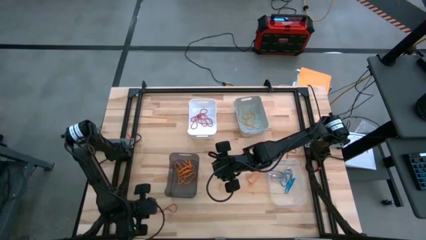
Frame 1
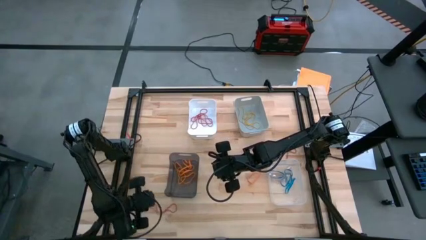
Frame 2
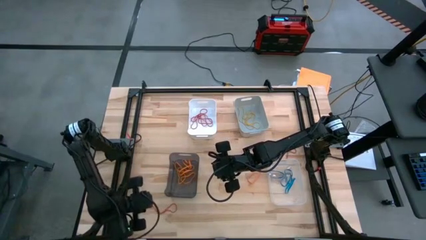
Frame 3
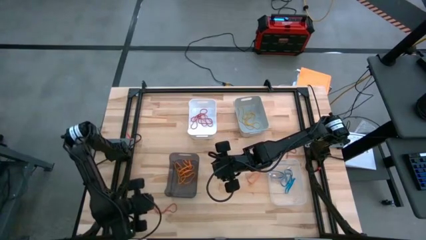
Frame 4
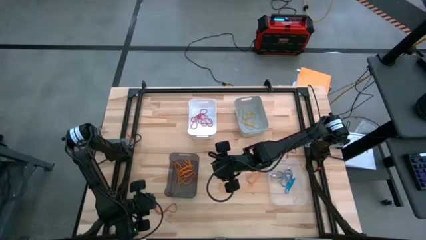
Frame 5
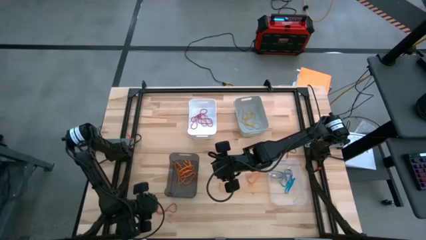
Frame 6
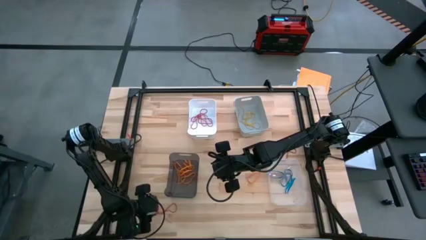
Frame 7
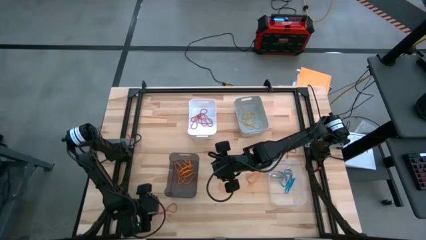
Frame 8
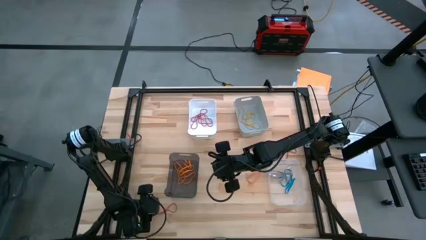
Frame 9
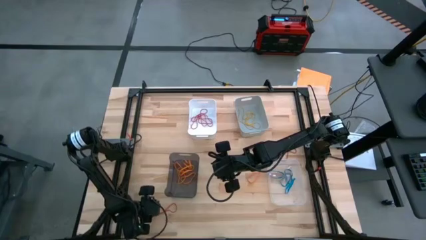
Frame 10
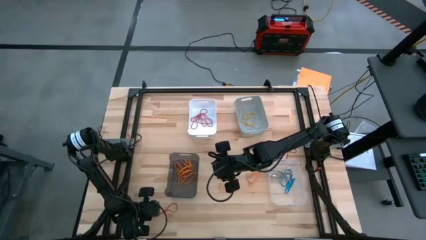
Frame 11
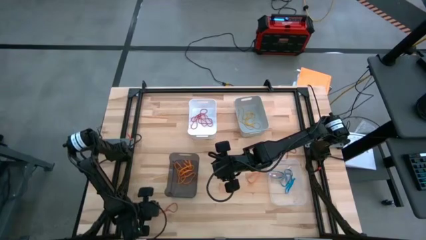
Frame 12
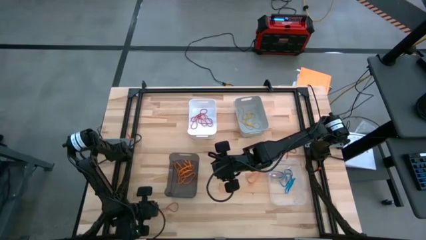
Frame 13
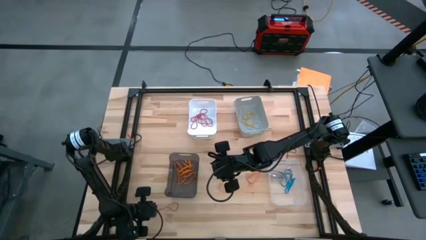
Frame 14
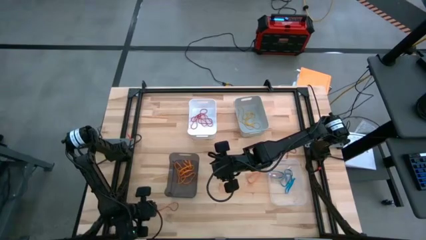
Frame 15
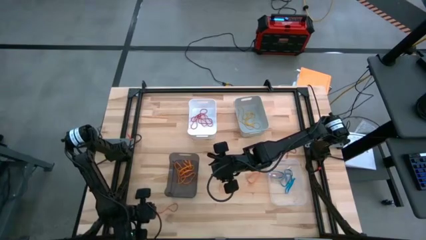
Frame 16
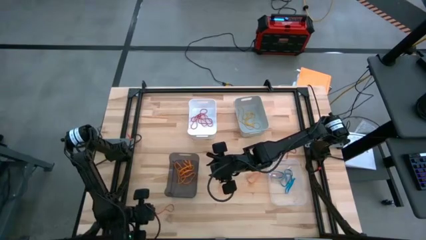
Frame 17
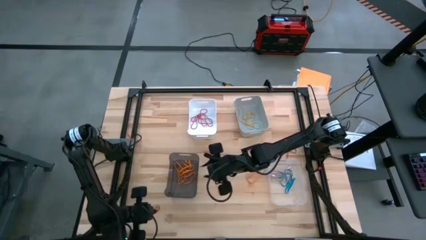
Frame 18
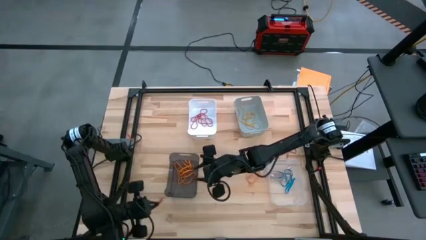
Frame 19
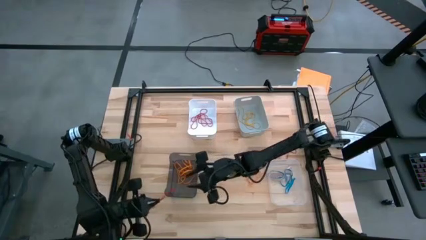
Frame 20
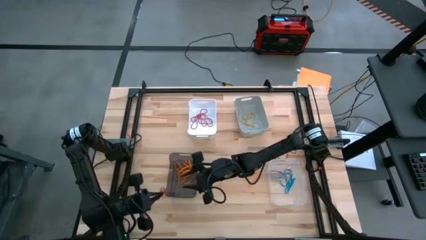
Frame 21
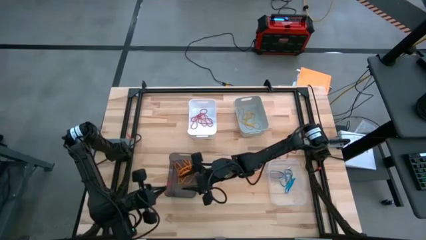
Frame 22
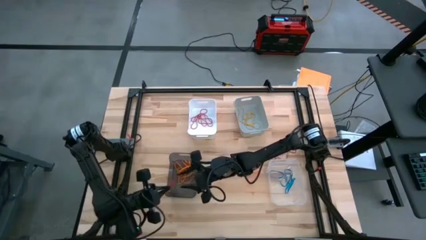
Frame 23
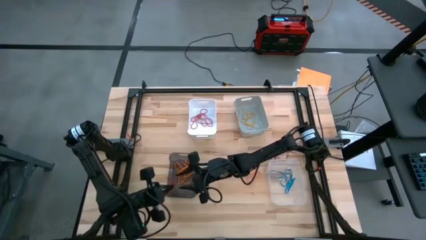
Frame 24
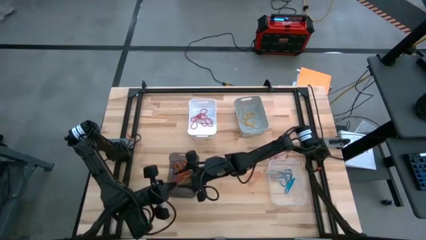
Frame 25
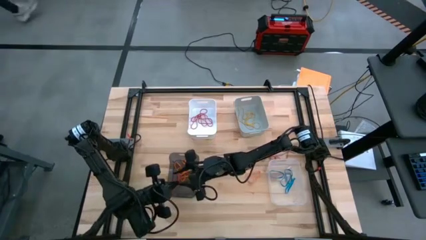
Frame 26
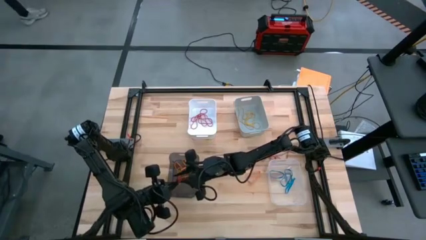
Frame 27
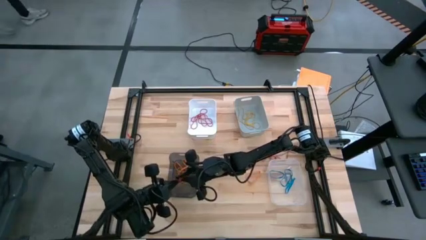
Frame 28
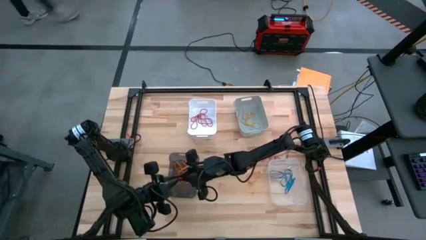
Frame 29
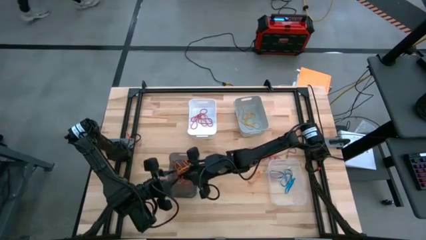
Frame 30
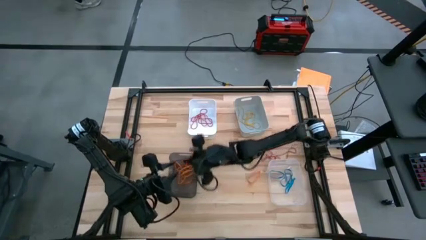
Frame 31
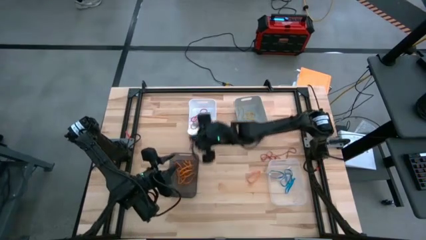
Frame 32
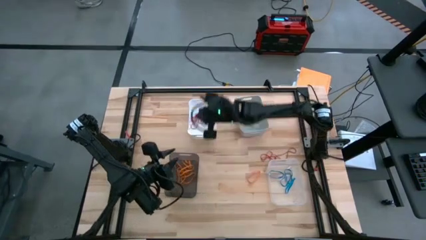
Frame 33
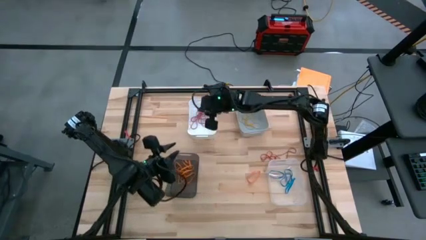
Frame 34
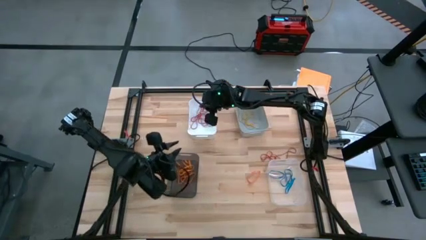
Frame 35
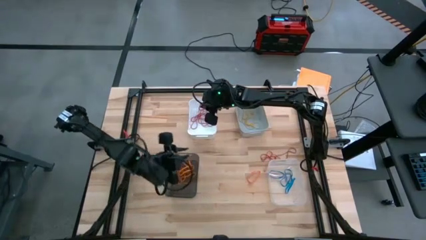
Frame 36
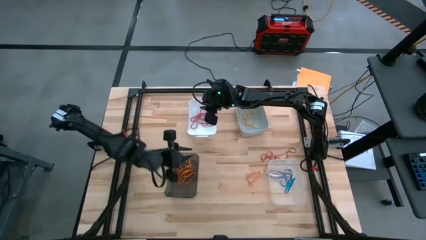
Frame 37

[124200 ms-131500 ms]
Task: Sort rubber bands into baskets
Put the red rubber band into the white bin

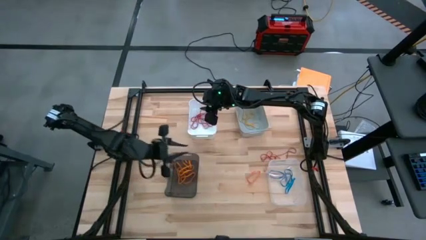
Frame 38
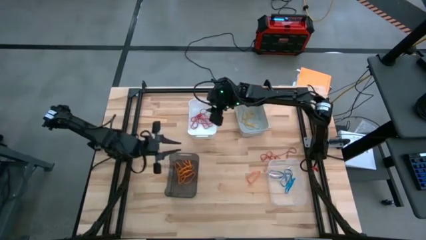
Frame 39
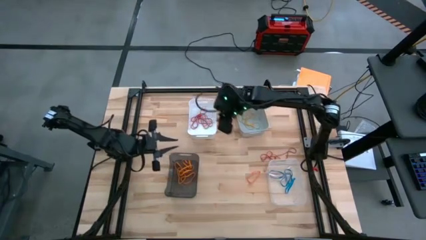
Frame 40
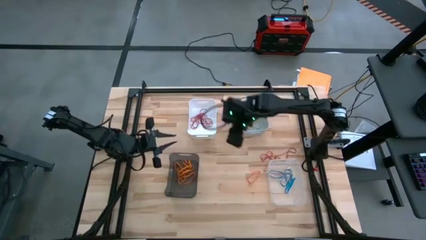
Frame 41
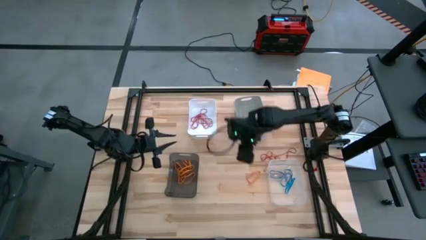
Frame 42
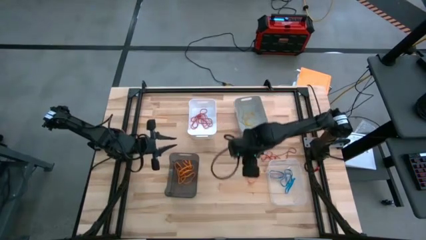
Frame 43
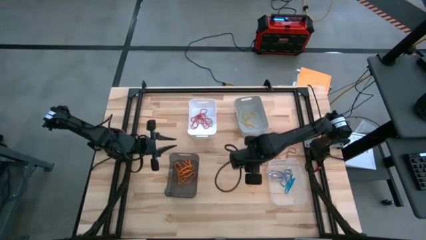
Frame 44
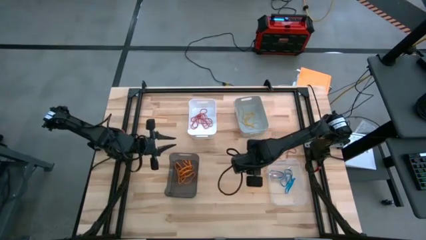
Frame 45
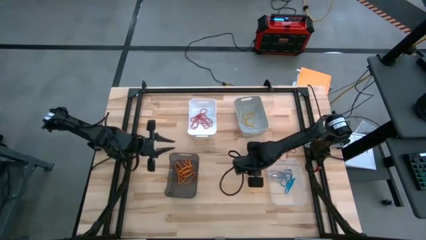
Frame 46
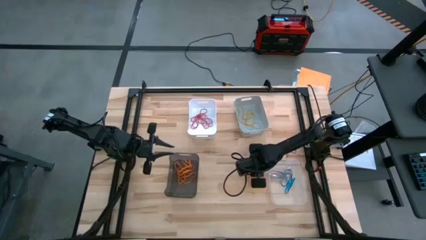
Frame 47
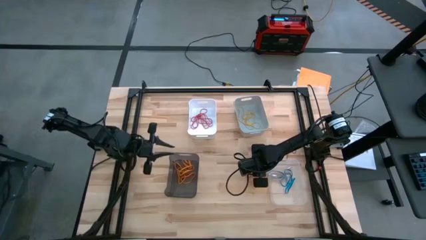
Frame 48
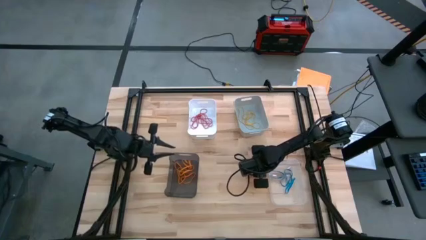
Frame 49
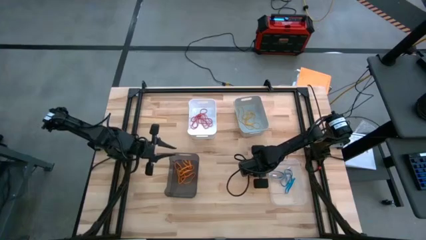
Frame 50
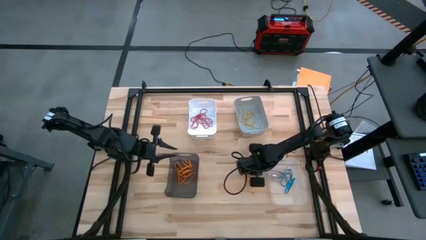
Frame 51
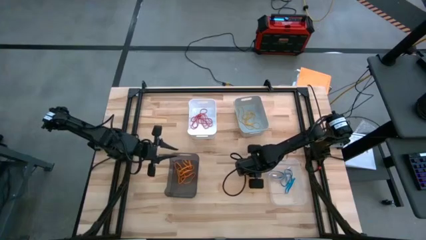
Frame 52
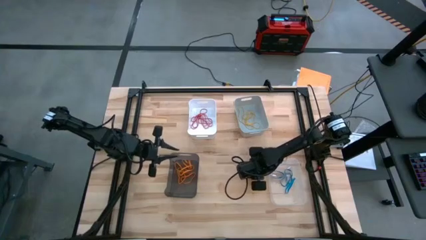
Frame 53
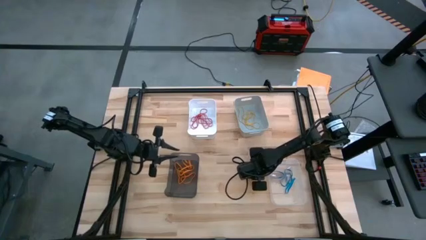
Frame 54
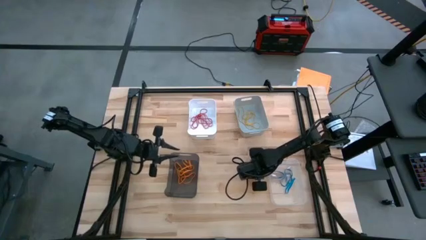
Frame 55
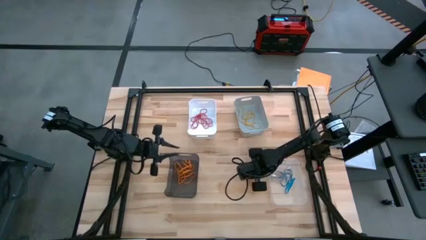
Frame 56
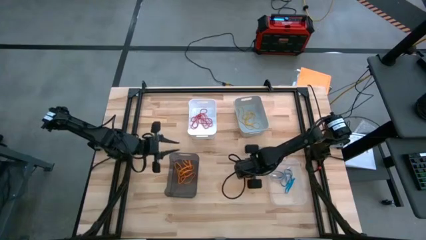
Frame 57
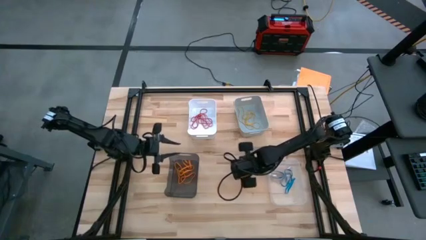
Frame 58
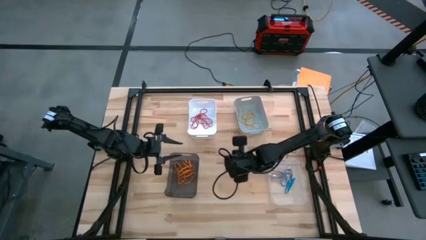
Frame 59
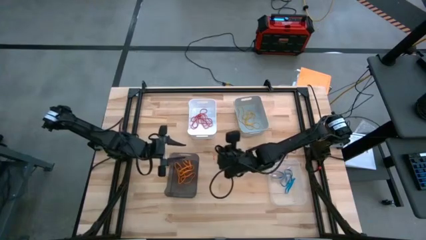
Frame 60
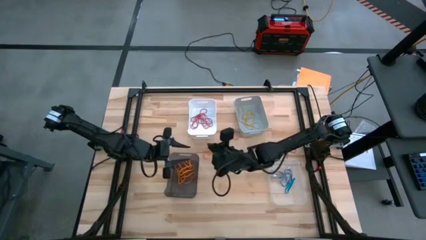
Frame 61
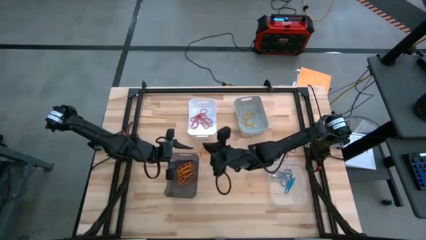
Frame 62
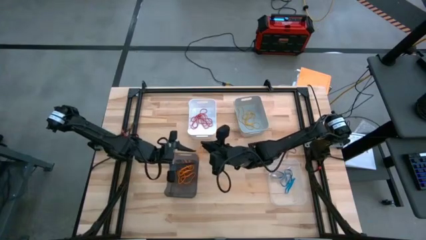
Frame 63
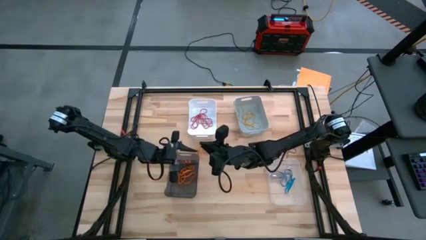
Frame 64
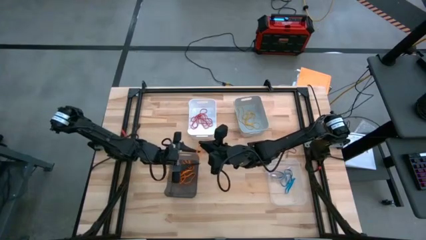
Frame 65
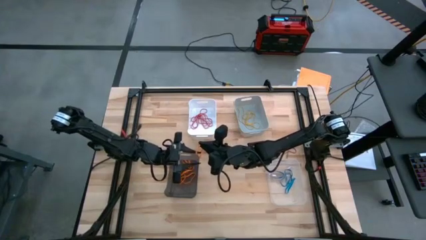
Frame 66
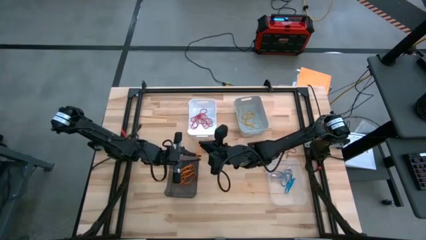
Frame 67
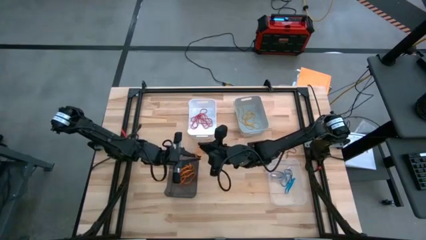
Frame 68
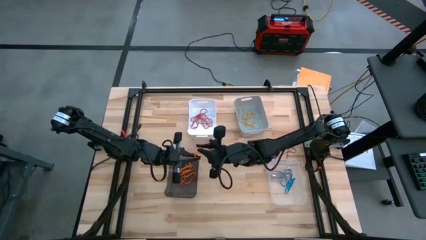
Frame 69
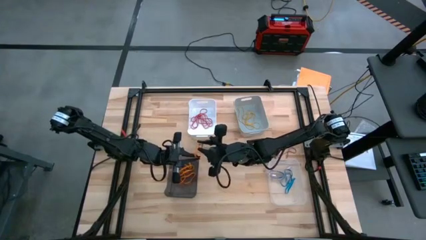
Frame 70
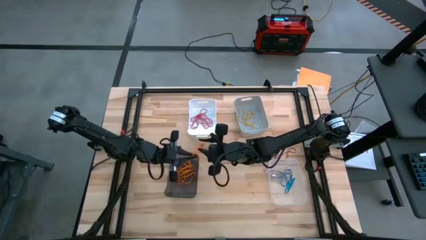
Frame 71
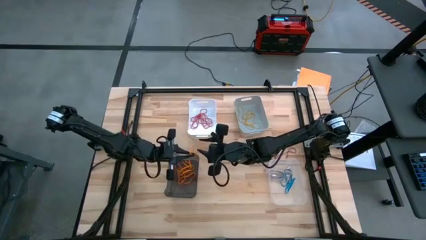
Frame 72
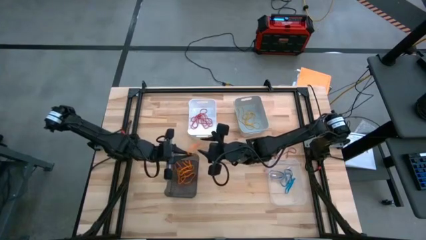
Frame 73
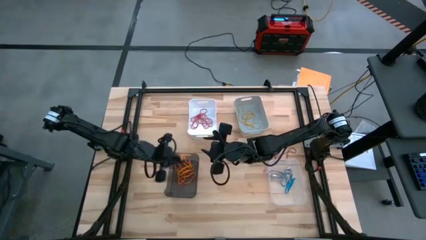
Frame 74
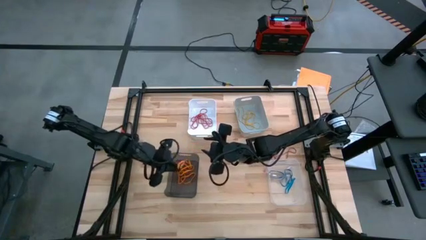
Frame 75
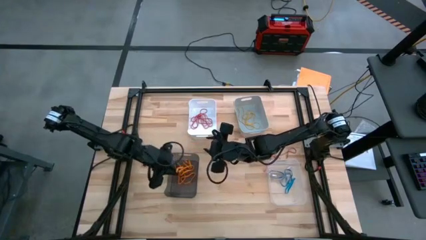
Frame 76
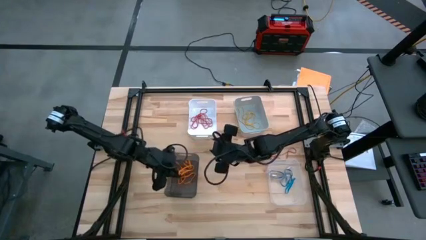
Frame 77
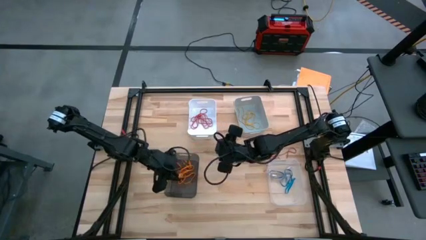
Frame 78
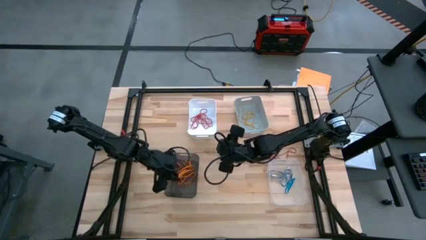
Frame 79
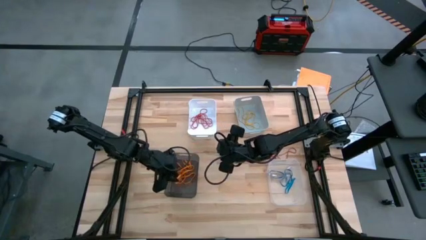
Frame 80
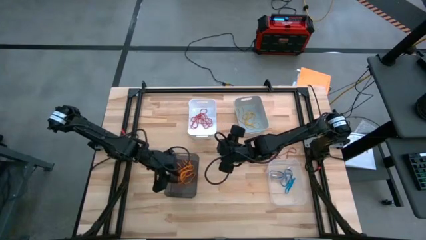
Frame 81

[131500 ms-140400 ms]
Put the orange rubber band into the black bin
